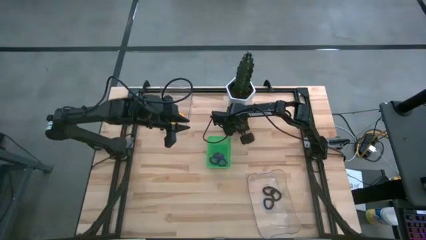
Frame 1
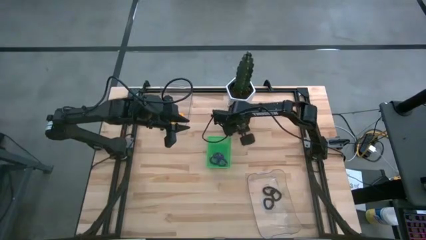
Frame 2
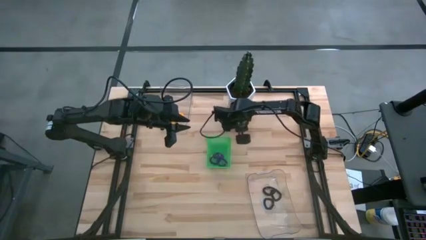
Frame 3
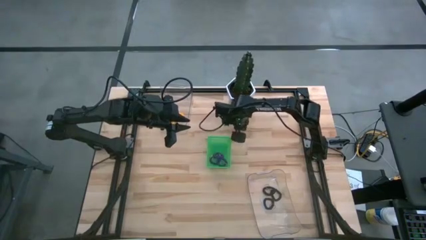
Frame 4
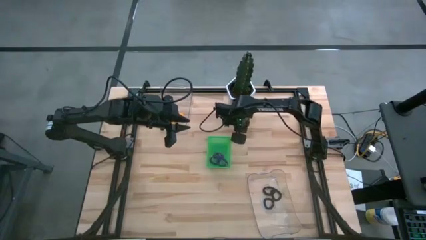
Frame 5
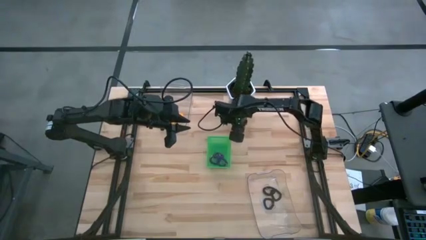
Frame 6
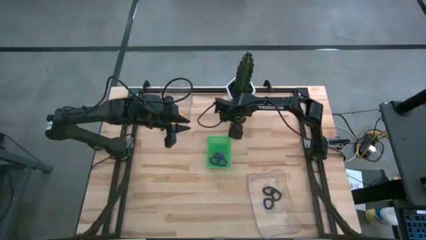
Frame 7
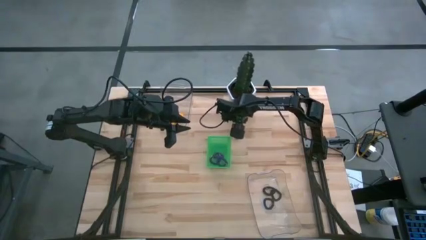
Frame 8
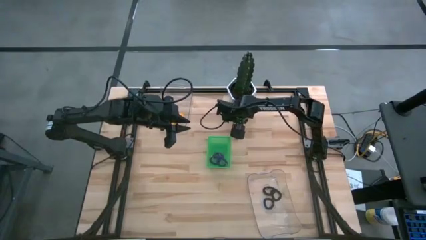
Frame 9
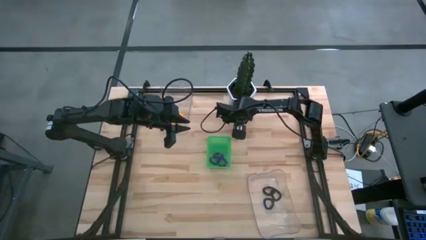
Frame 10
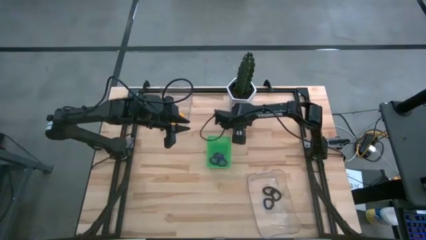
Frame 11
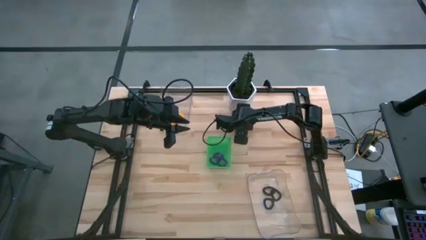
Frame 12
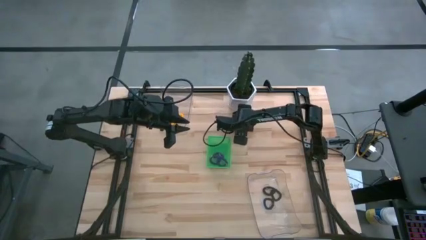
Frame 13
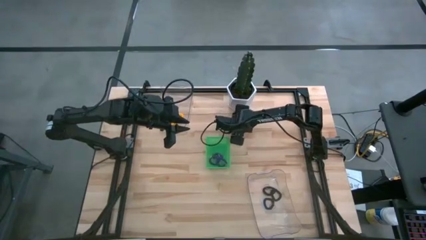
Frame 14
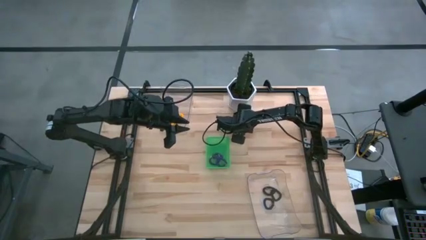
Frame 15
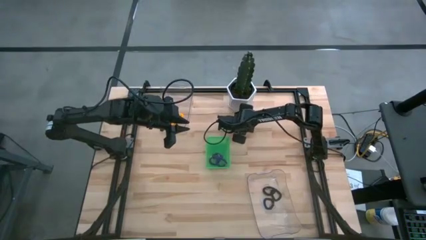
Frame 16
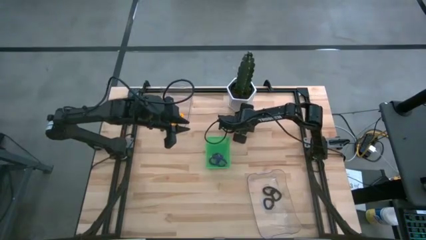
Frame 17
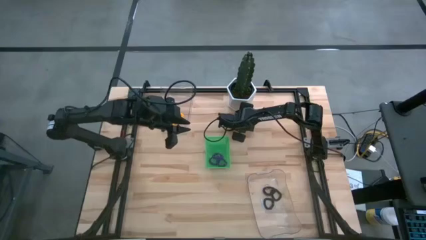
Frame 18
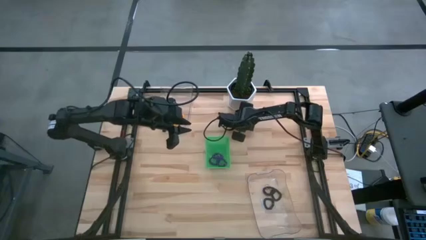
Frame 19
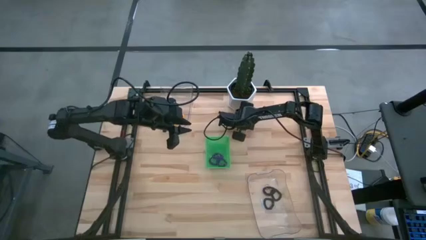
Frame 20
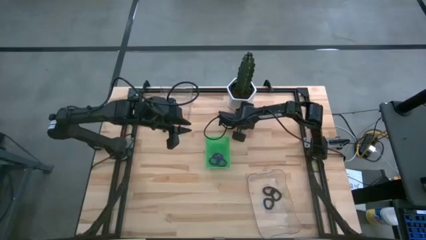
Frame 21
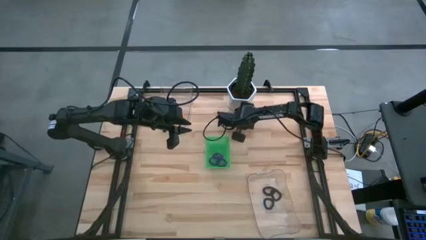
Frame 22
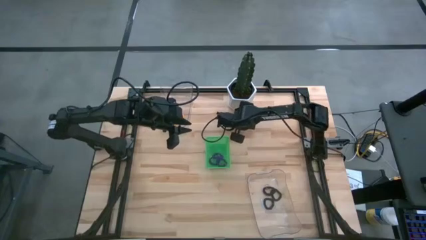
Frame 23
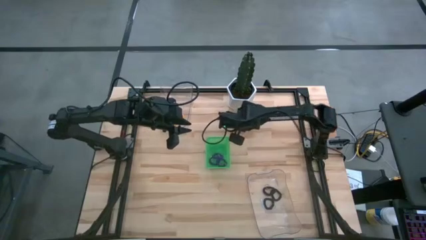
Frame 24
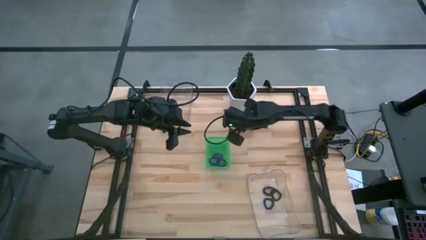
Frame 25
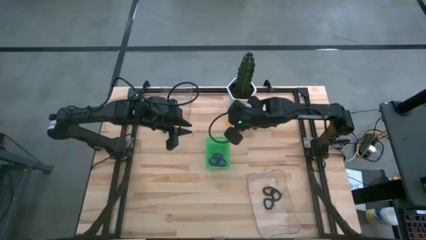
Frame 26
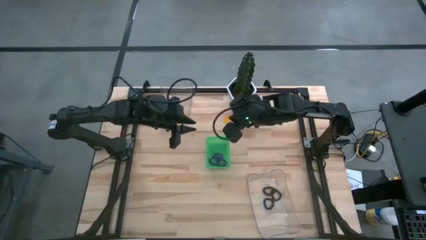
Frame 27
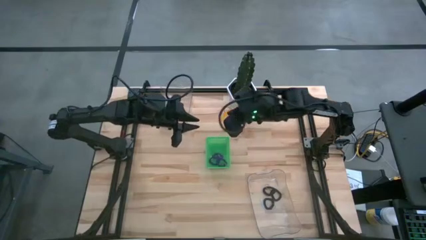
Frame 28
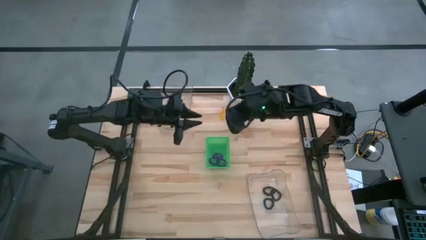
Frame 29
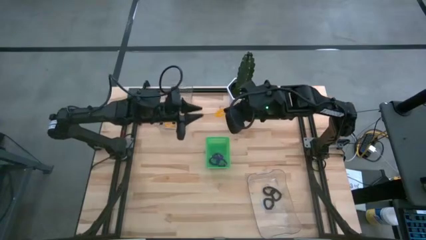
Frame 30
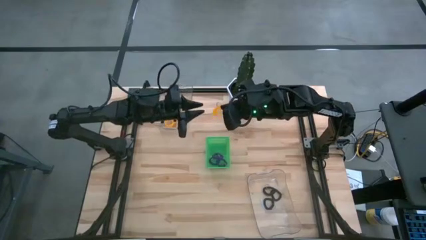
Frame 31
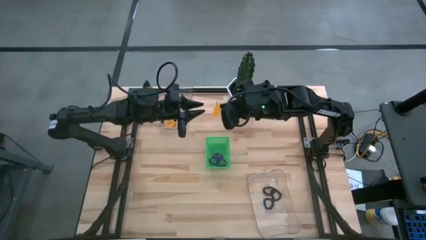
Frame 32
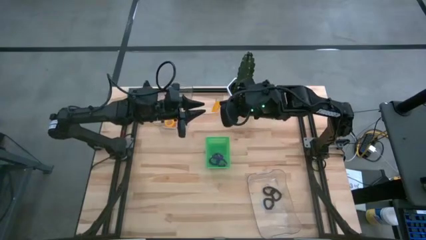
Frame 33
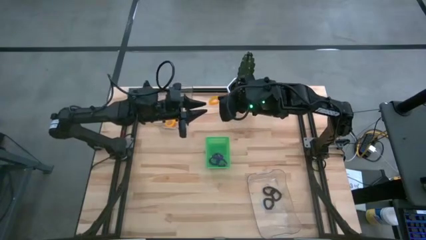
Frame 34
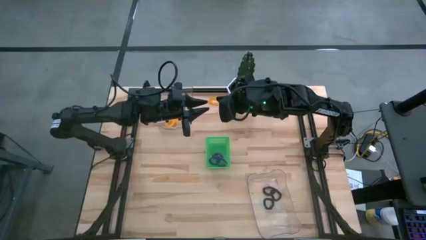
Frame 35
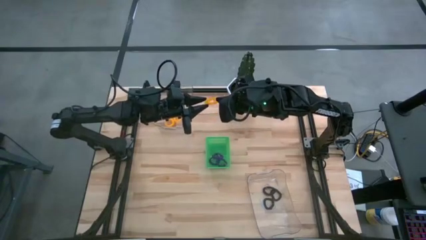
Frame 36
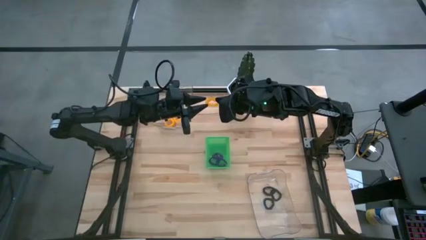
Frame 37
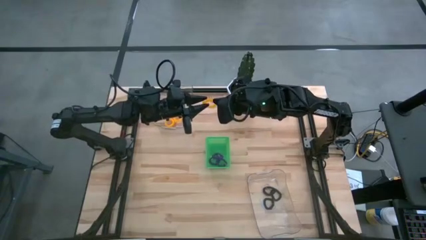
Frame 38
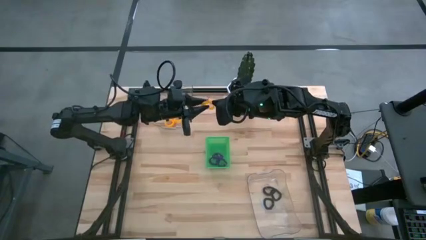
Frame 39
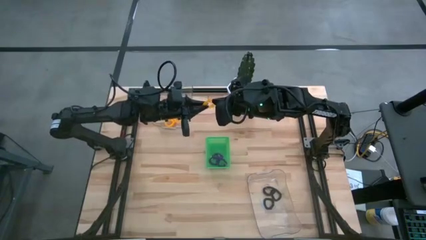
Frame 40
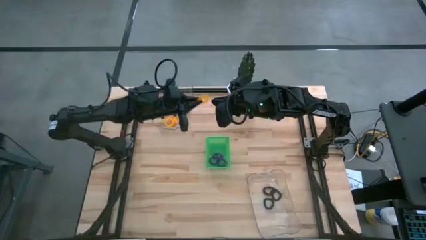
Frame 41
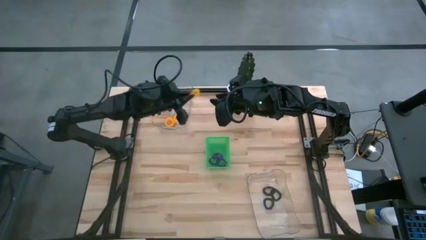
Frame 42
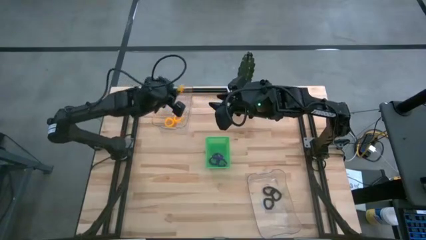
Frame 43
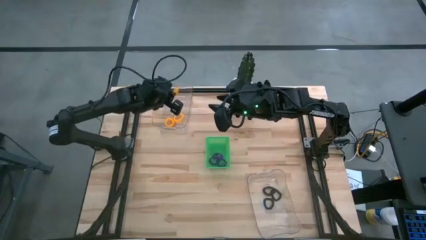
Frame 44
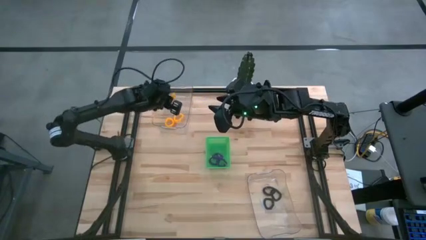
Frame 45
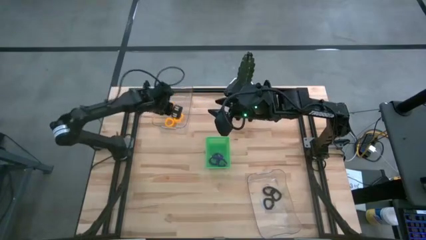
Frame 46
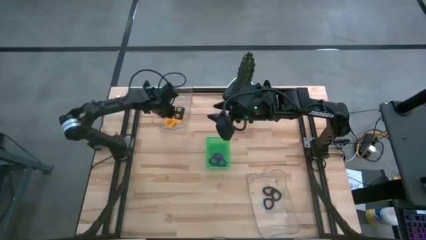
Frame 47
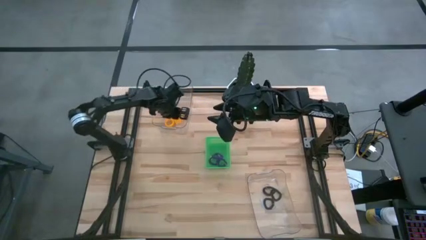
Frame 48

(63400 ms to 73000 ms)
Task: Sort spring keychains
Put the yellow spring keychain into the top transparent bin

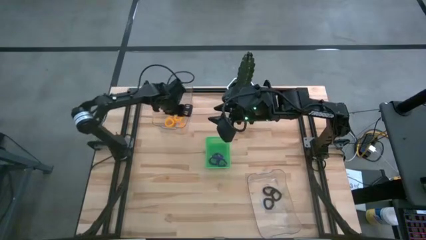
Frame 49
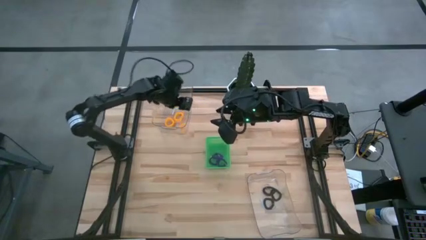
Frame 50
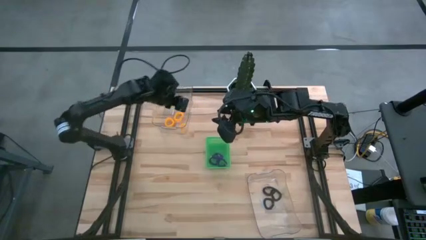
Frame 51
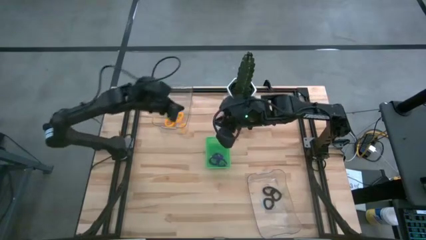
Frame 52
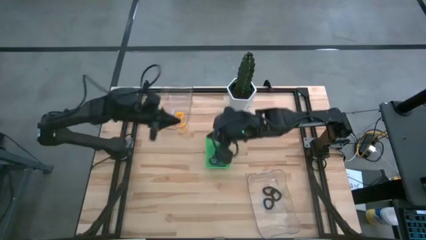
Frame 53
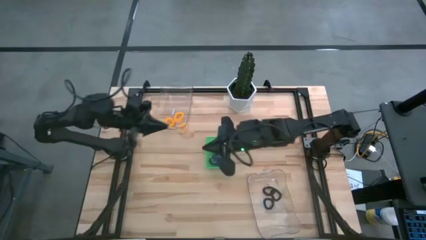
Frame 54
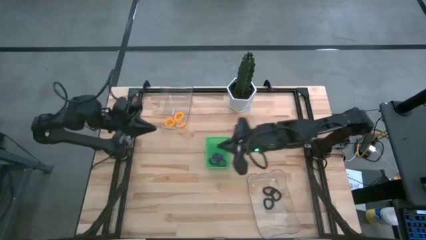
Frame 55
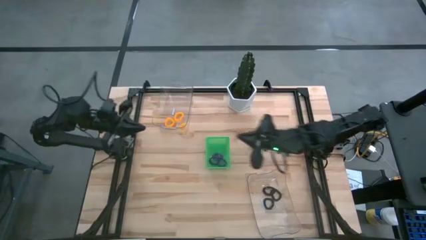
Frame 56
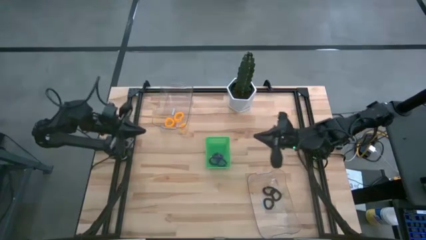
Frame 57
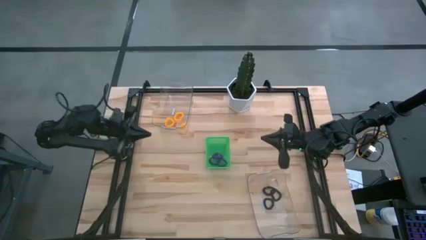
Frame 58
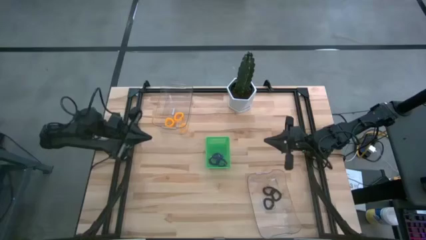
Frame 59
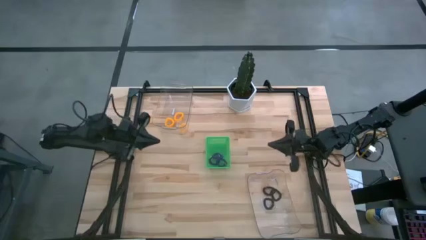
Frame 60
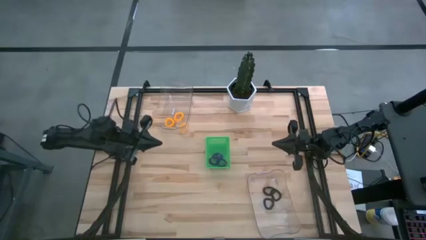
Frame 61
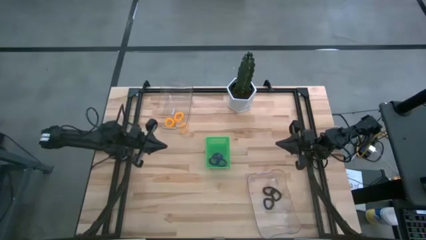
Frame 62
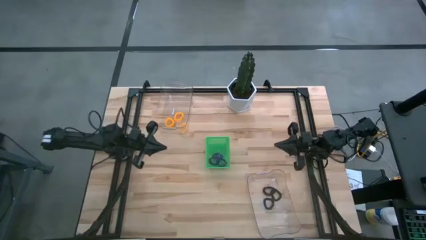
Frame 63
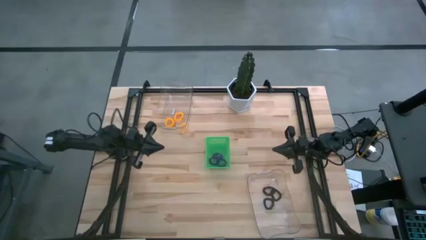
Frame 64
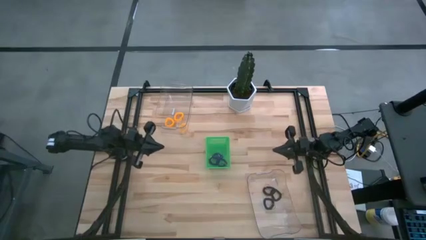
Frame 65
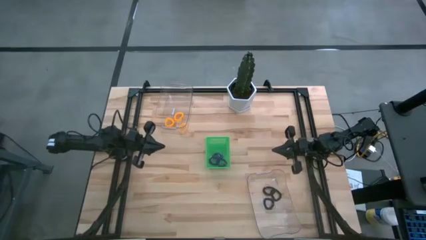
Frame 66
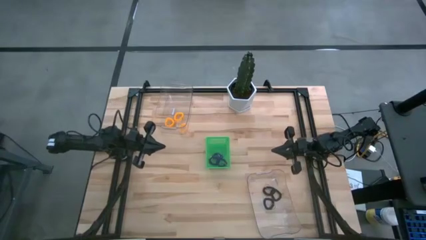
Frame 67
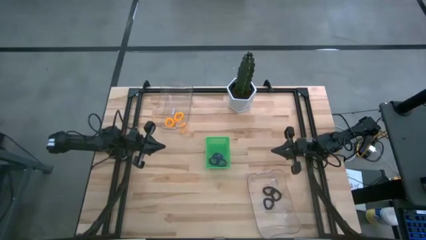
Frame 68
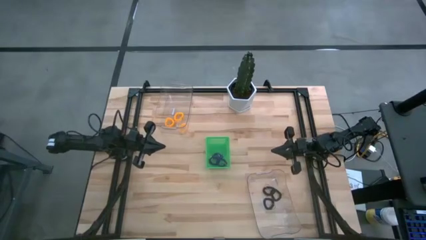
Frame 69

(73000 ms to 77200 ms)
Return to Home Position
